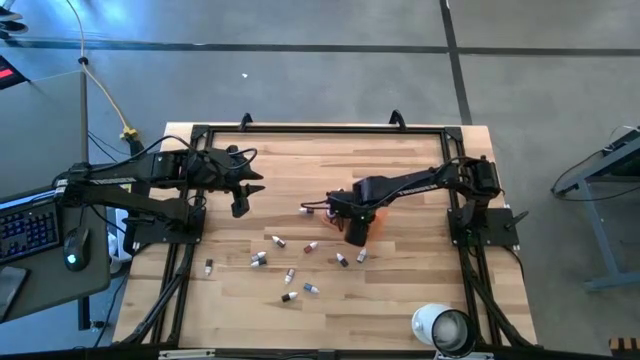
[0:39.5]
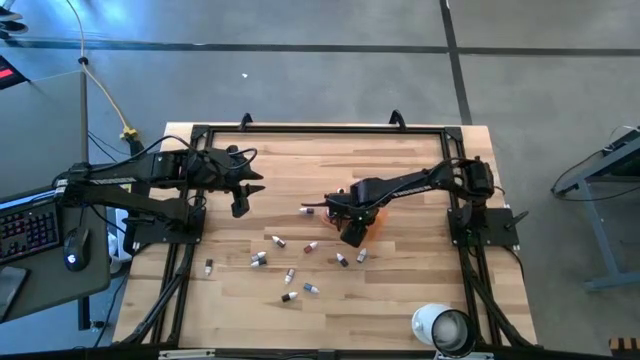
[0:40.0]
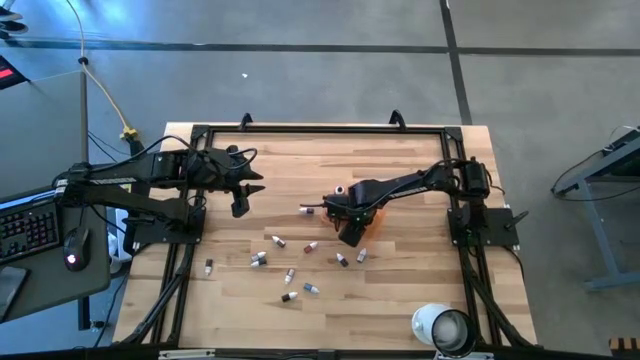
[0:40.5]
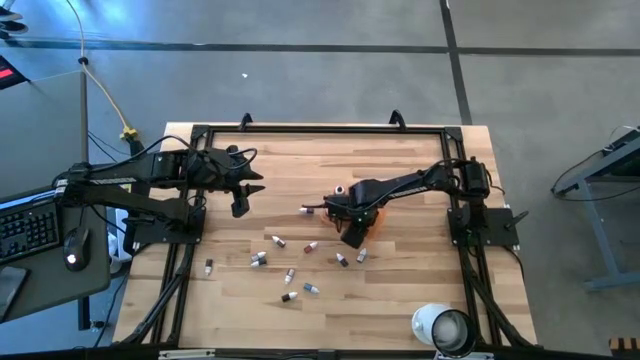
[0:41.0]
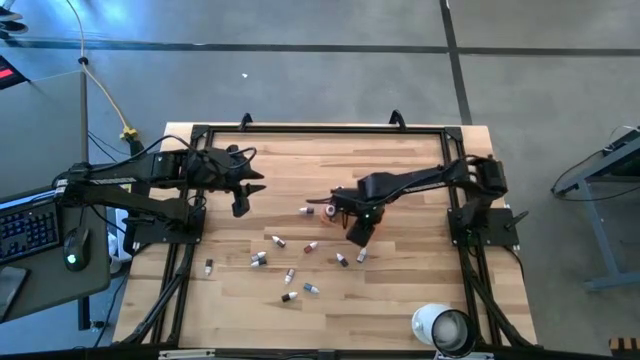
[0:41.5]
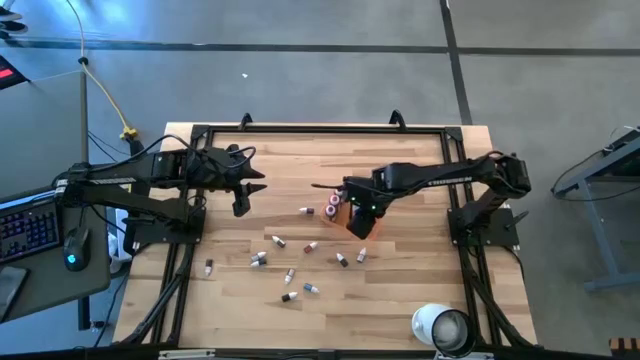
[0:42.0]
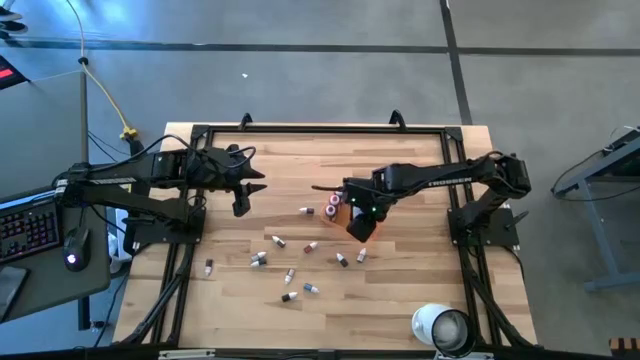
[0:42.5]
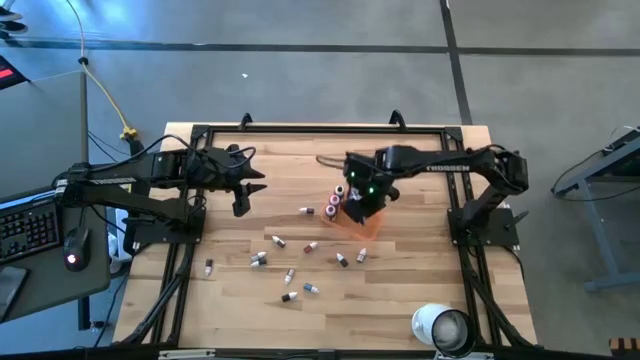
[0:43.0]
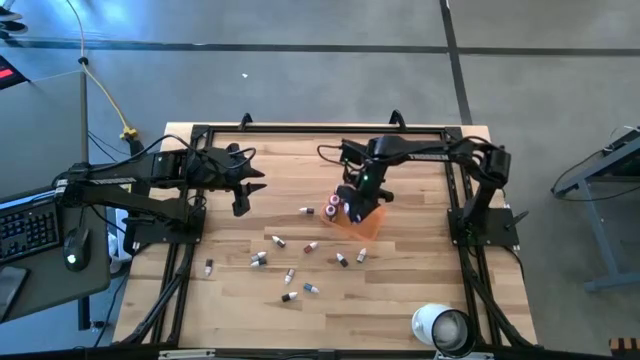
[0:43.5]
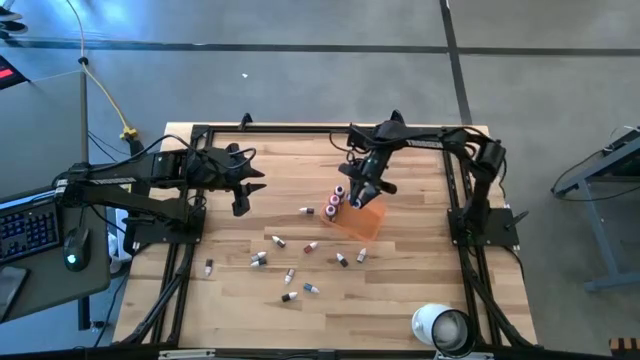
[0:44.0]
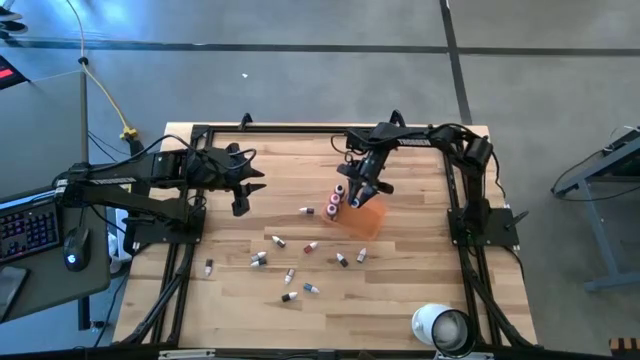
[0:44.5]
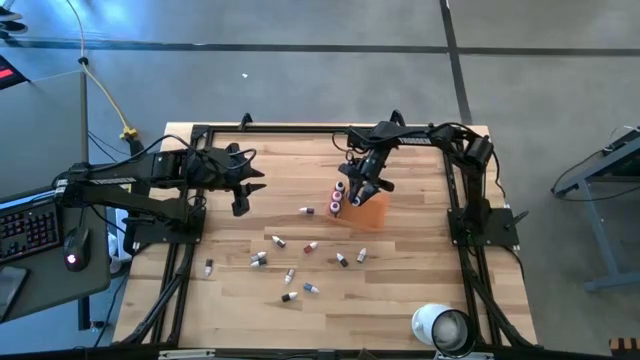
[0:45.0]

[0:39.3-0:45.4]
Task: Pick & Place food coloring
Adjust the big blue food coloring bottle

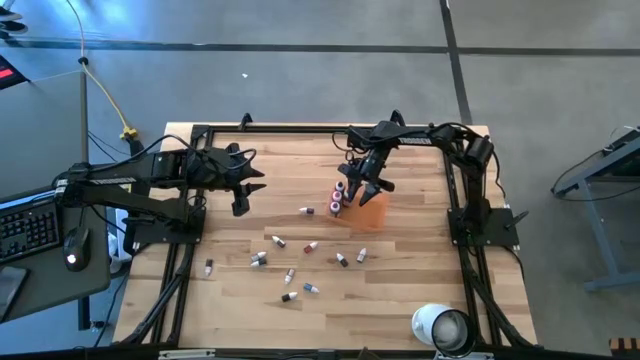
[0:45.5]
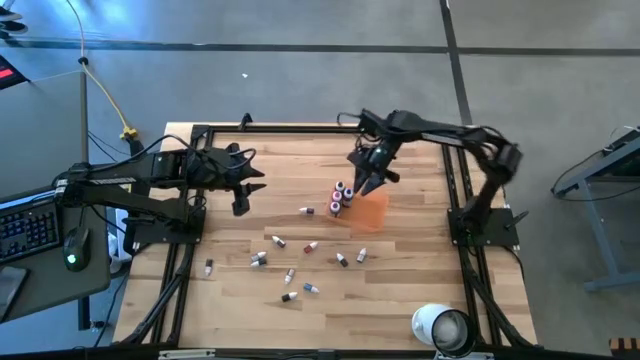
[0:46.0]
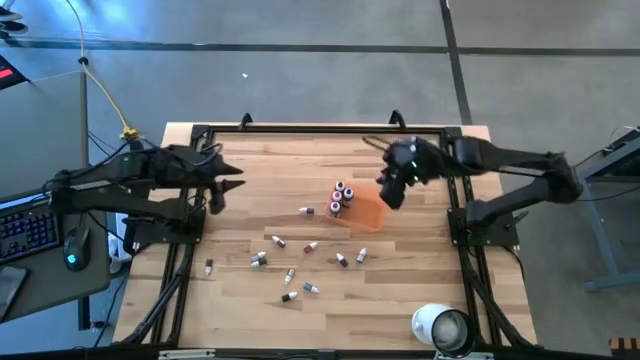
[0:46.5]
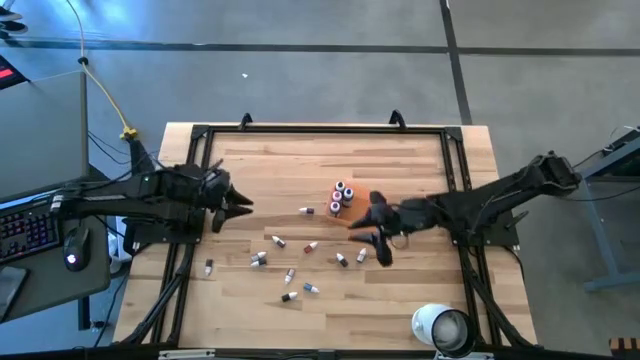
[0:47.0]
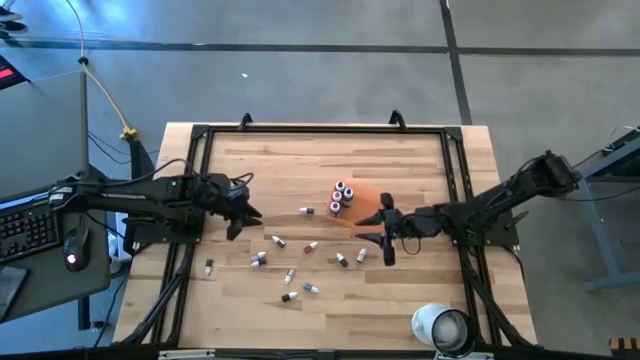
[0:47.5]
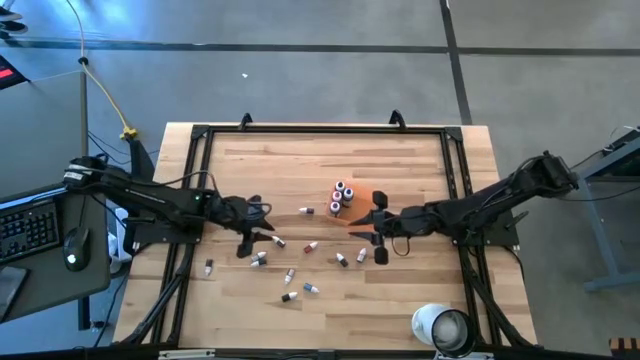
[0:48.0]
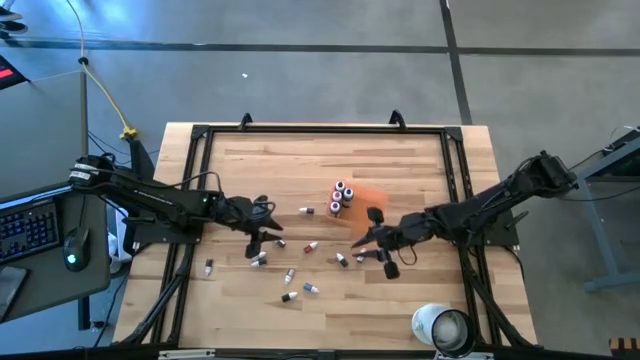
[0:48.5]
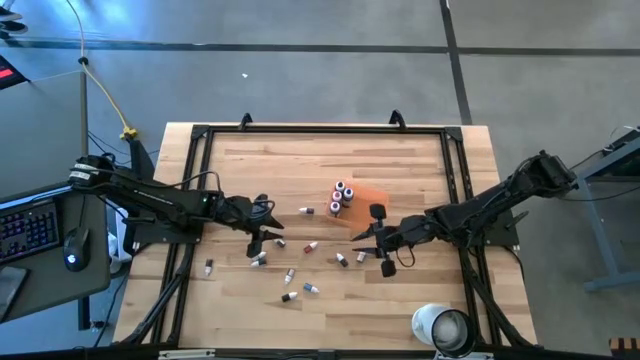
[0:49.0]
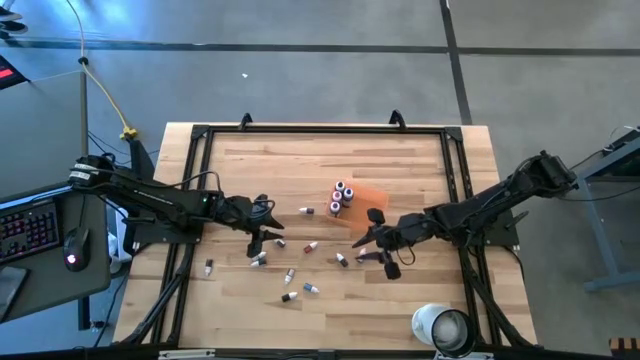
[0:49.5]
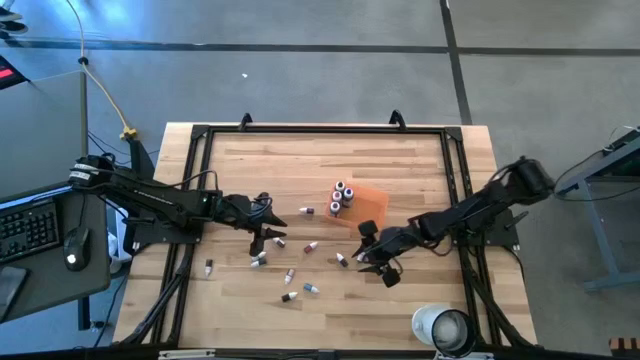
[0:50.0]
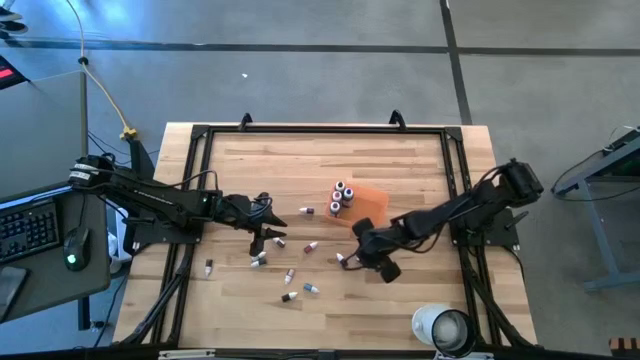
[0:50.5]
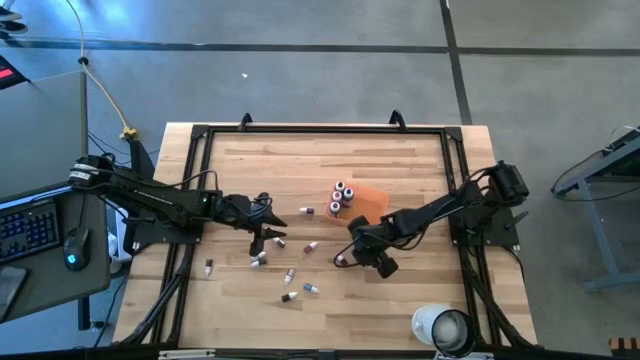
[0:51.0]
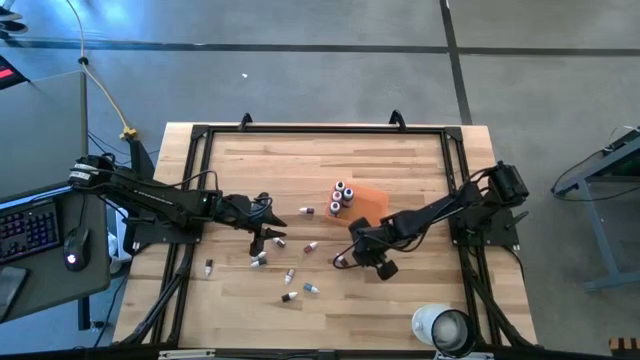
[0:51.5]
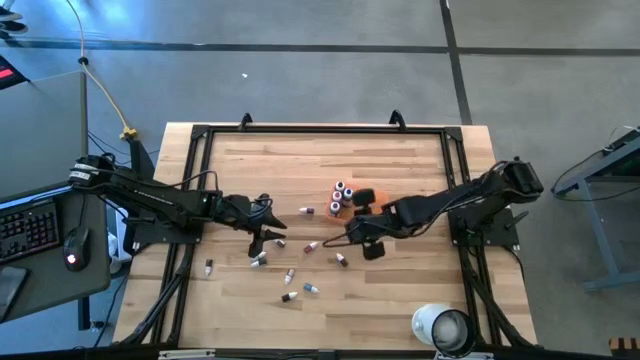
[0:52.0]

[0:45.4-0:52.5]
Put the right small green food coloring bottle into the orange bin

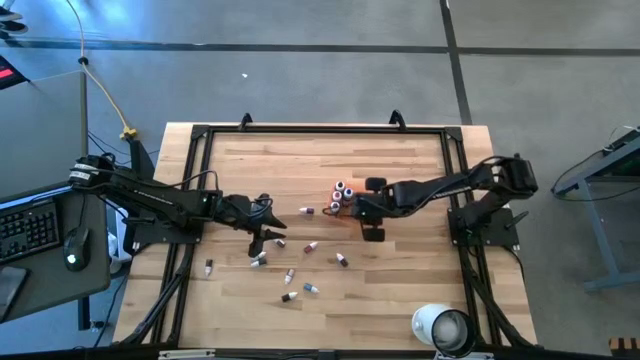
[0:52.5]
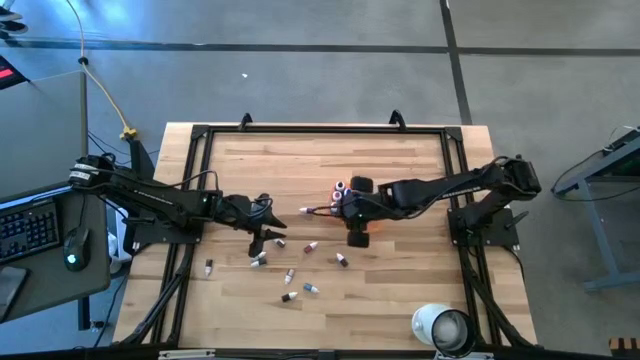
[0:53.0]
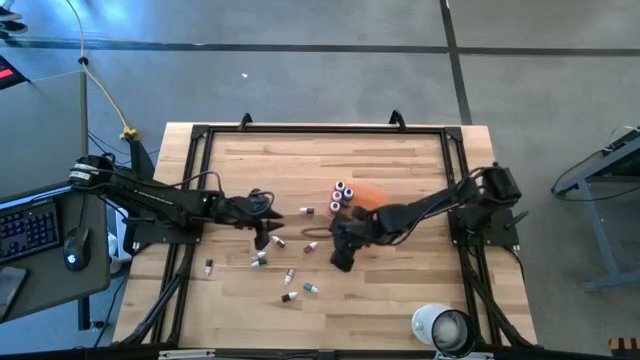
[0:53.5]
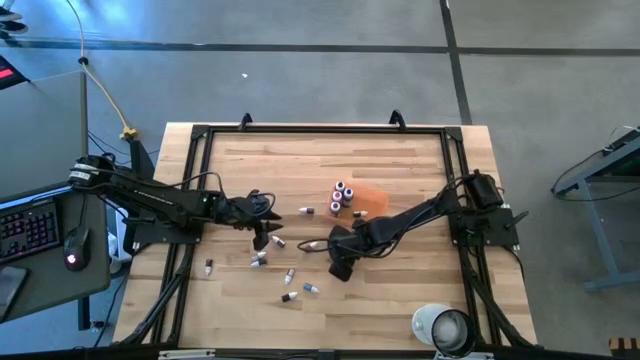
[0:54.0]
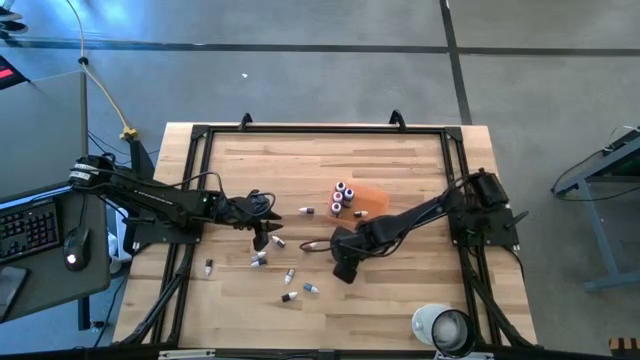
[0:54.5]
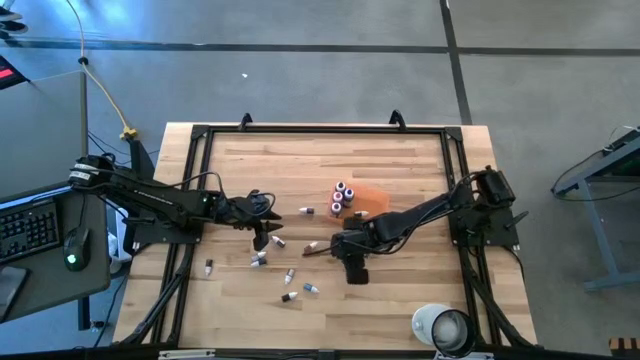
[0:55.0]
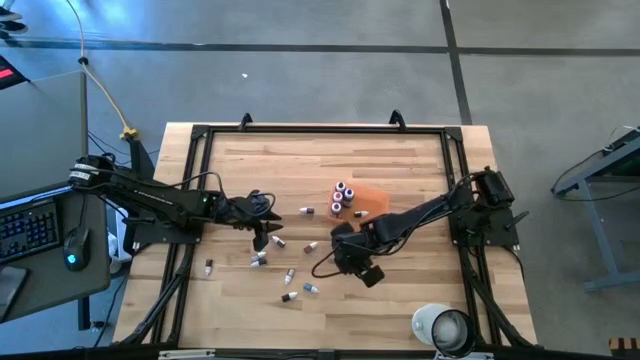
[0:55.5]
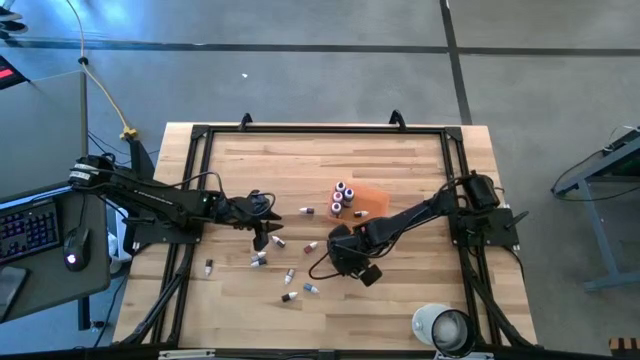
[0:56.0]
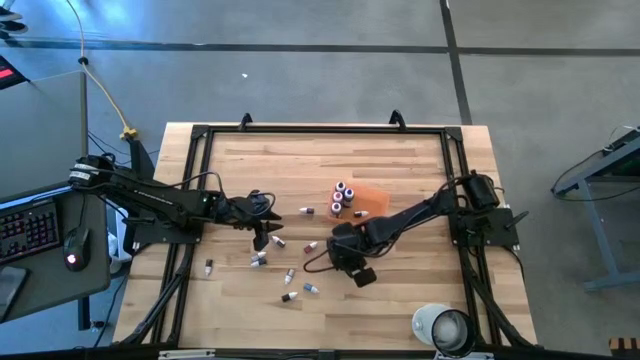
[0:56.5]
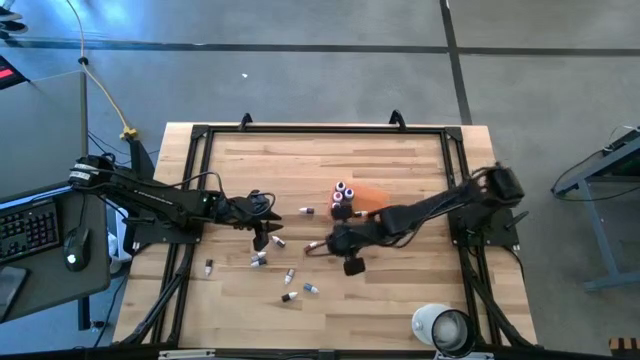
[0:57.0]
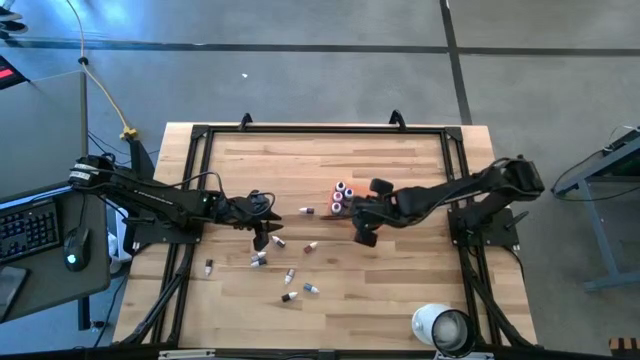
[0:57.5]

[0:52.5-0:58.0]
Put the right small black food coloring bottle into the orange bin

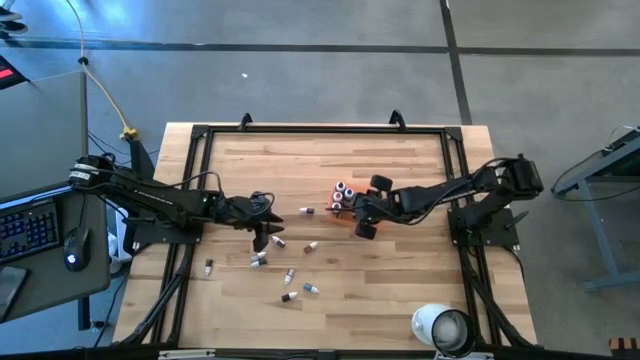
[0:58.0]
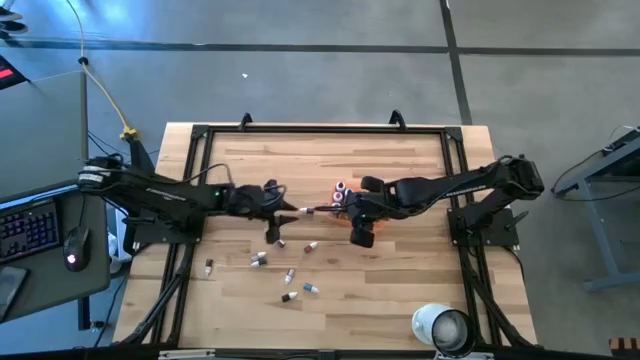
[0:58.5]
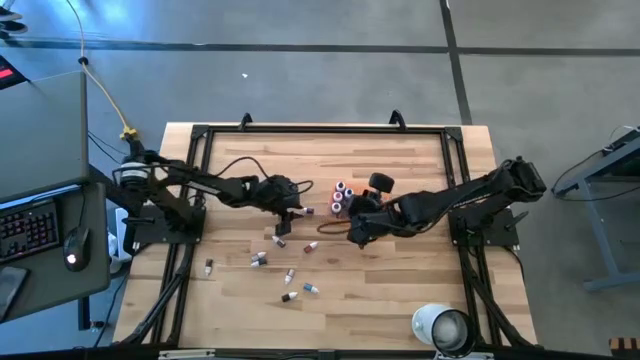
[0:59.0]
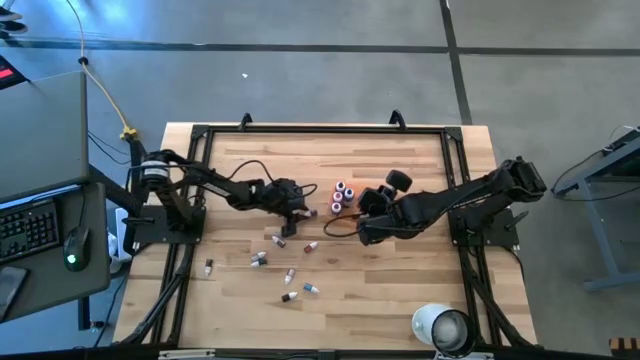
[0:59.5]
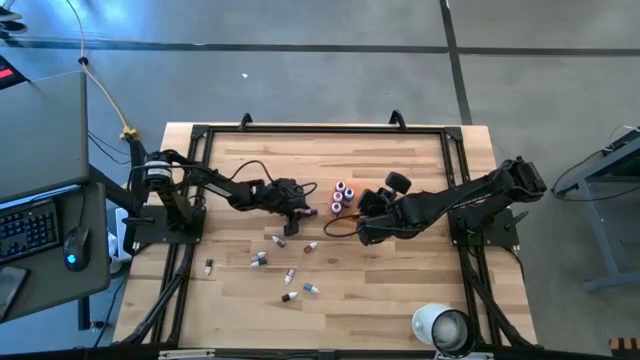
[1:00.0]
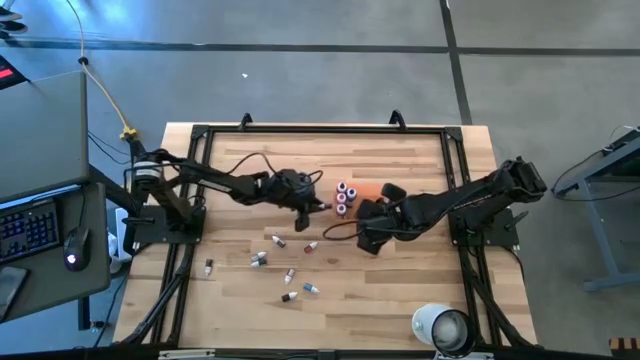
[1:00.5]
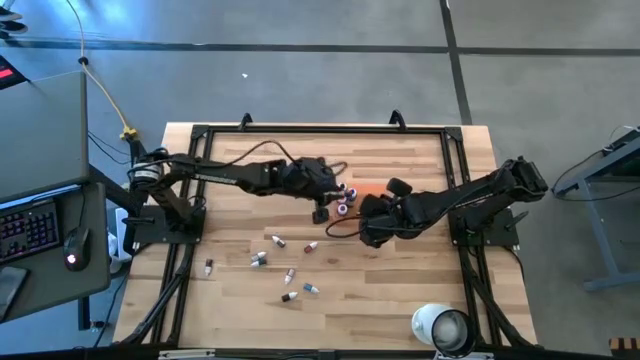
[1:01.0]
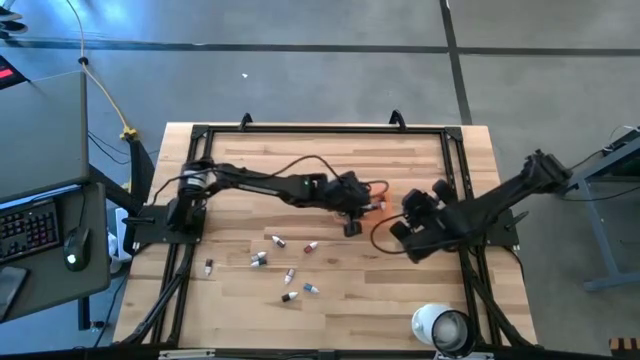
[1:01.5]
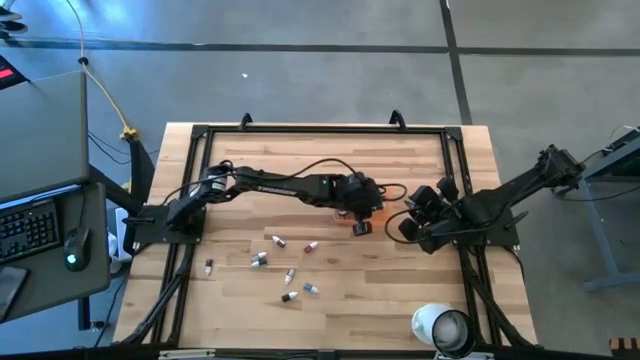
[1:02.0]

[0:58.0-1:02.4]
Put the top small purple food coloring bottle into the orange bin
